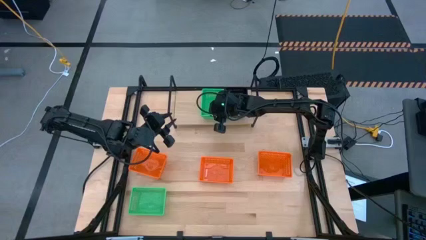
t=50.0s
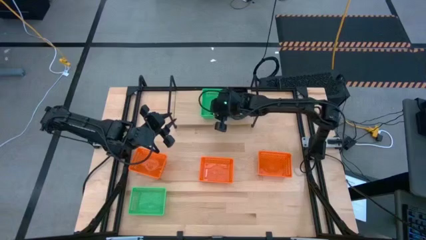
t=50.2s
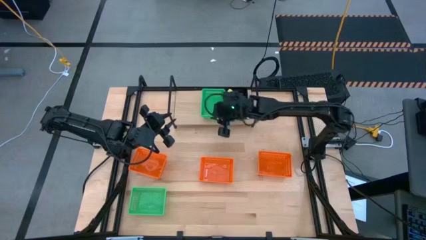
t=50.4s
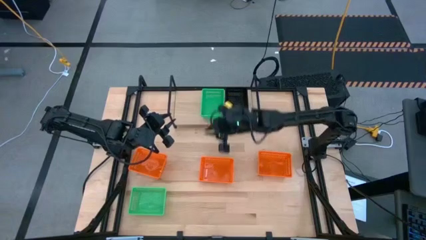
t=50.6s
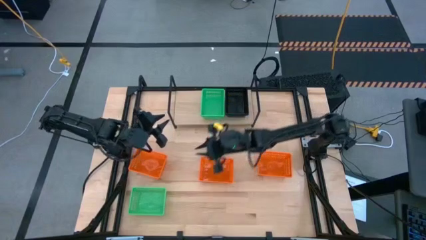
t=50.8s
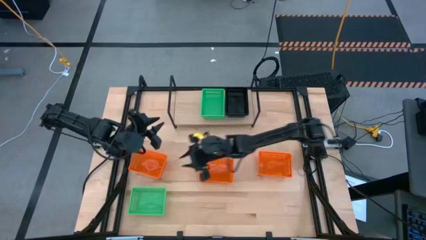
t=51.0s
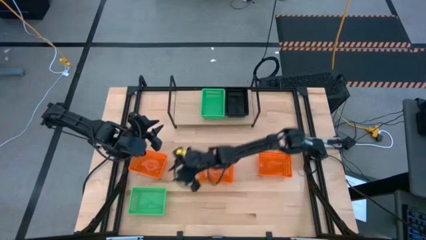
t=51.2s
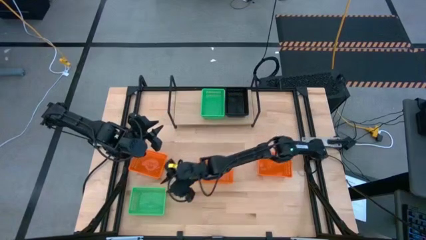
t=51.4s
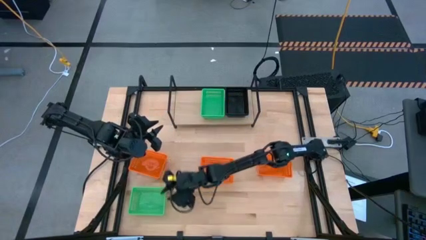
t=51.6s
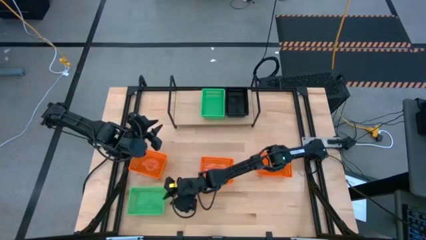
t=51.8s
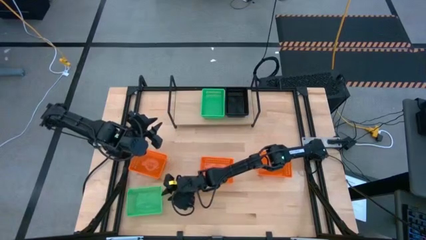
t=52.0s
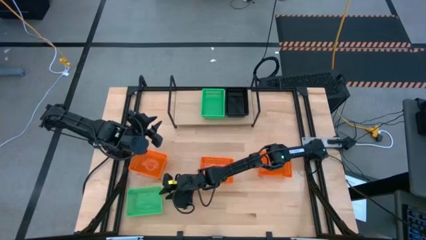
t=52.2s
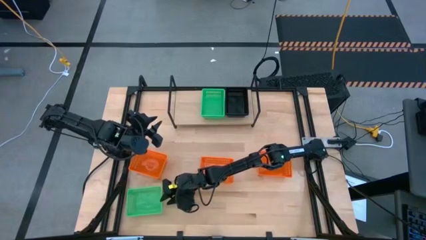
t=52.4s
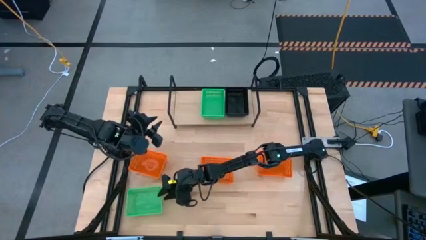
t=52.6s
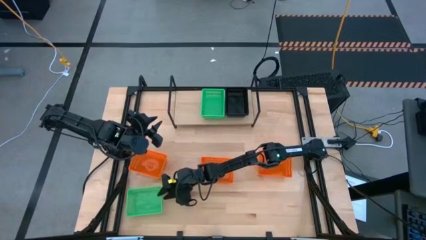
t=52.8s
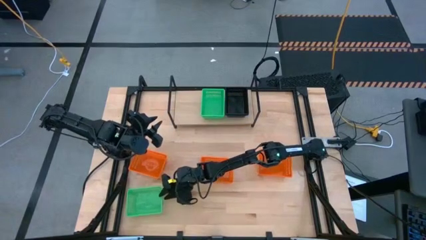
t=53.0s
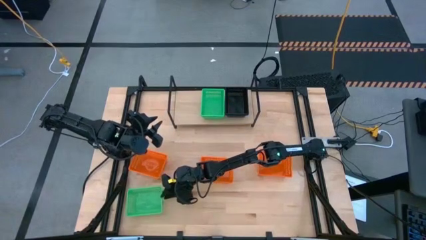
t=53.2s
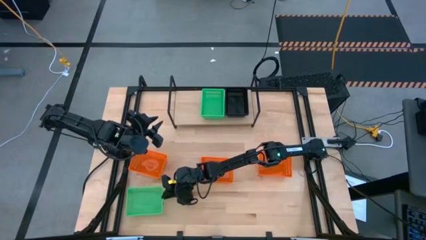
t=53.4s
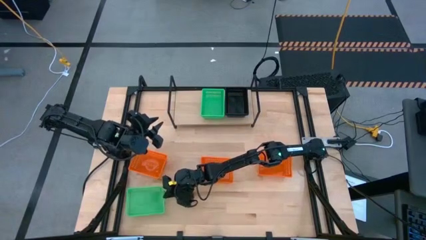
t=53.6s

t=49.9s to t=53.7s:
Task: Stack baskets on shelf by color
Stack the green bin on the green bins on the shelf

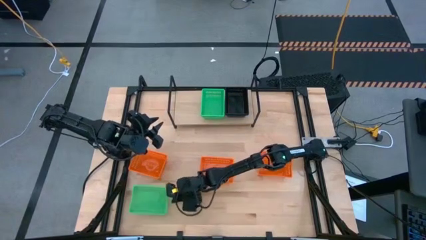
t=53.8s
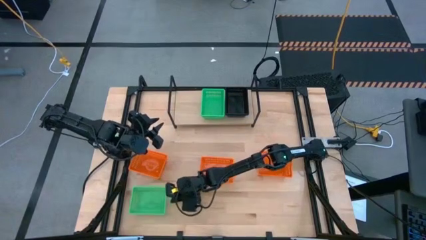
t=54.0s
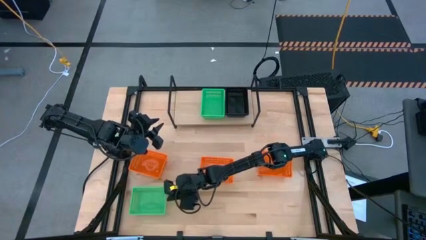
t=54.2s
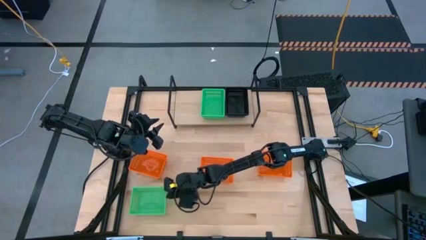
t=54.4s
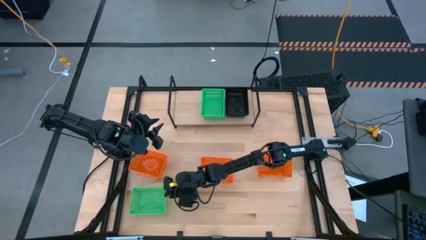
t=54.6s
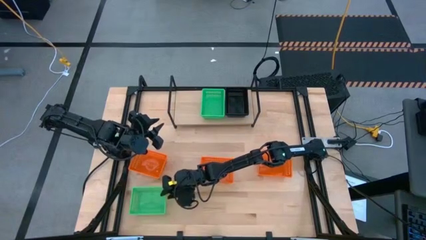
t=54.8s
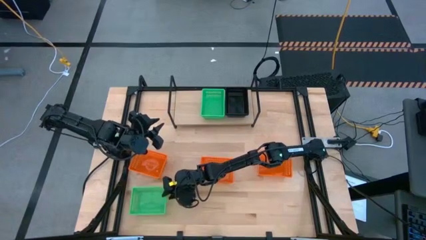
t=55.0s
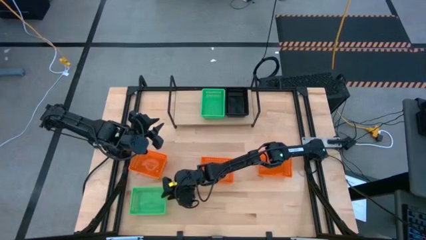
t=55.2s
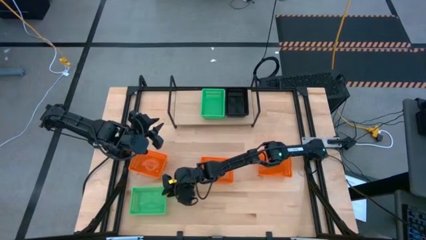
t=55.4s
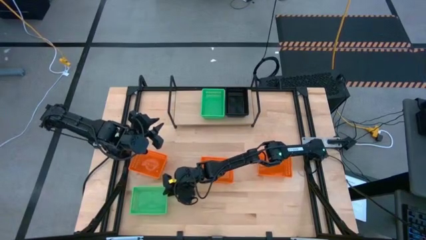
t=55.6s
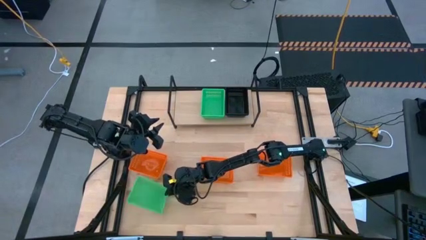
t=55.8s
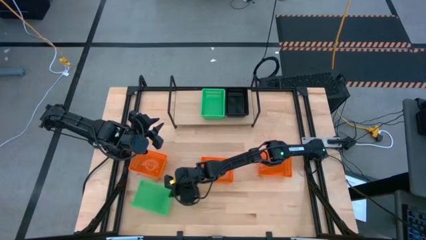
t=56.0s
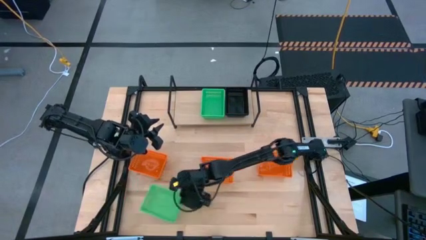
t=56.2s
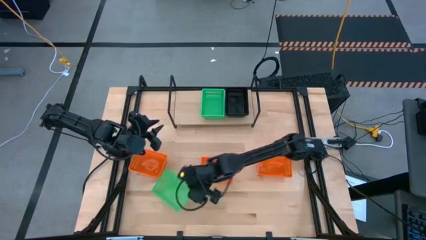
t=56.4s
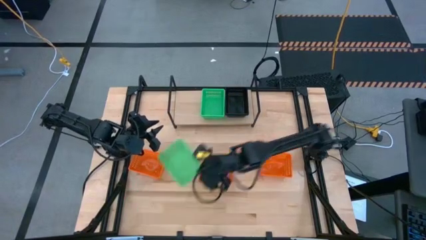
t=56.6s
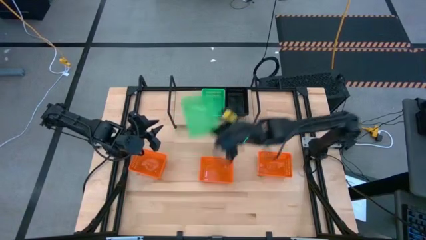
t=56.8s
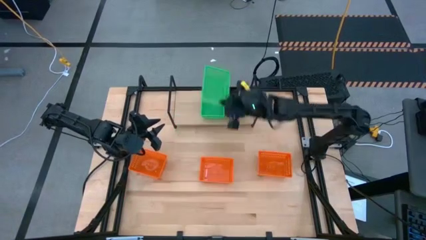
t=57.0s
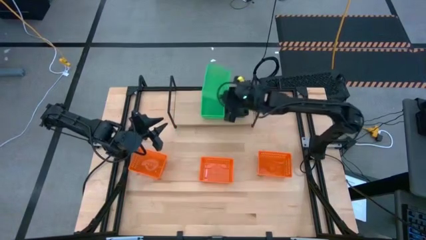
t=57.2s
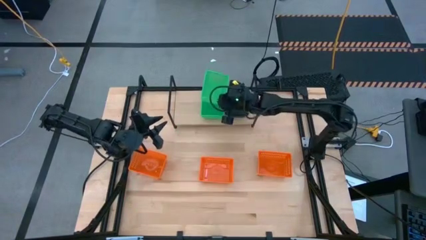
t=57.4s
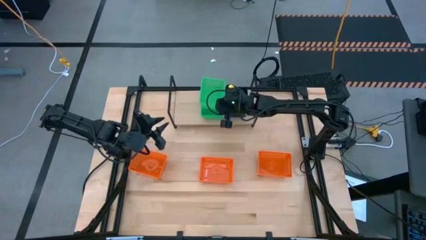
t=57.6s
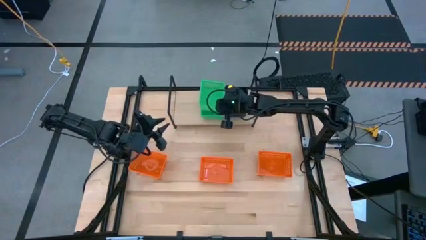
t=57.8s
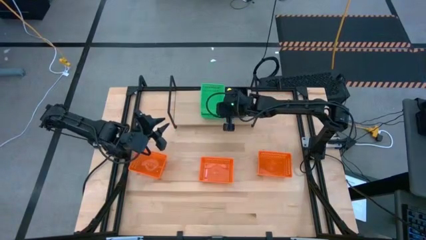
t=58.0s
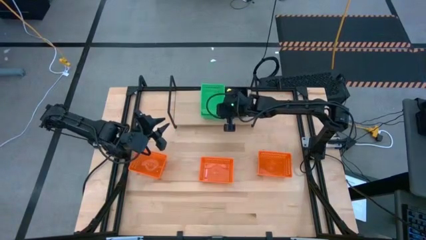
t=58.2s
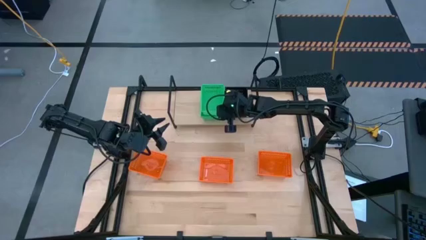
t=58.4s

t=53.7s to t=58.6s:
Stack the green bin on the green bins on the shelf

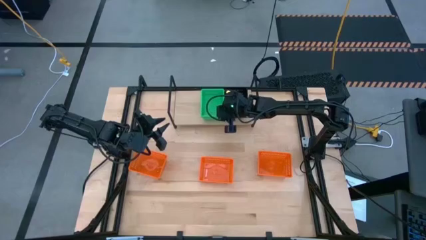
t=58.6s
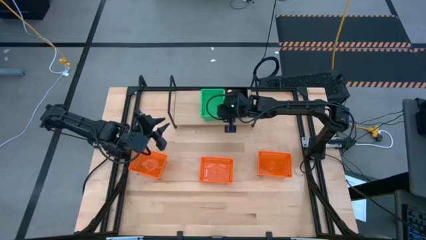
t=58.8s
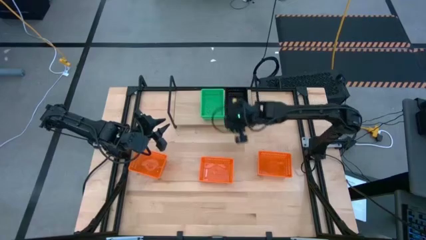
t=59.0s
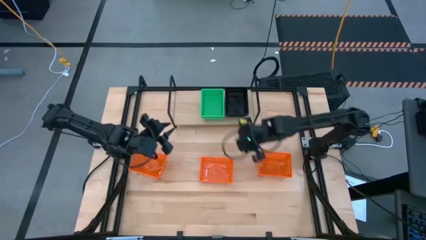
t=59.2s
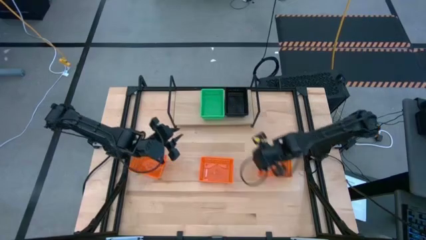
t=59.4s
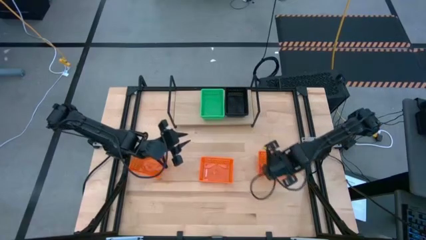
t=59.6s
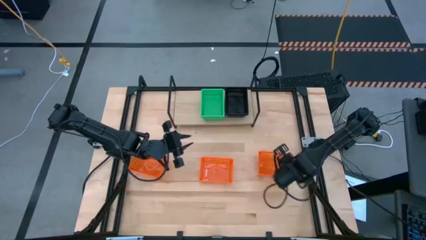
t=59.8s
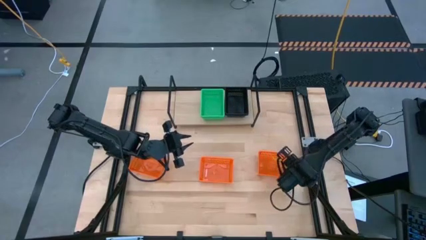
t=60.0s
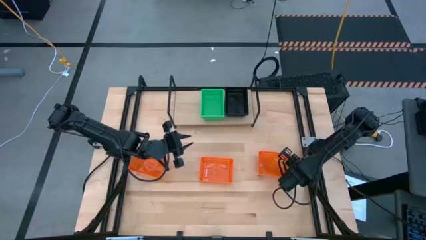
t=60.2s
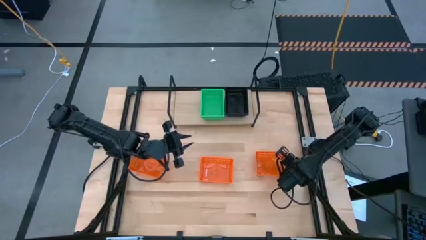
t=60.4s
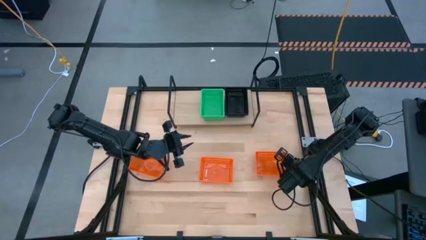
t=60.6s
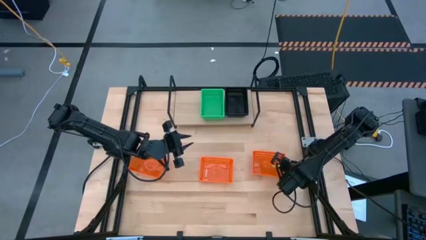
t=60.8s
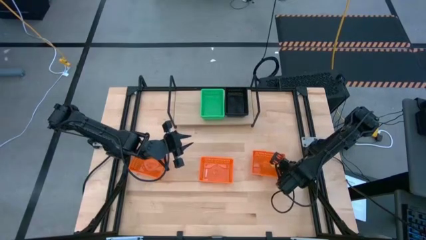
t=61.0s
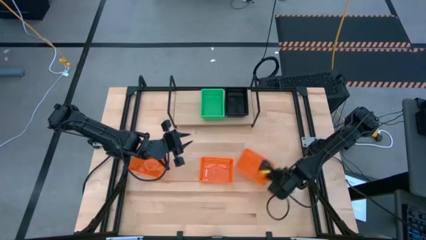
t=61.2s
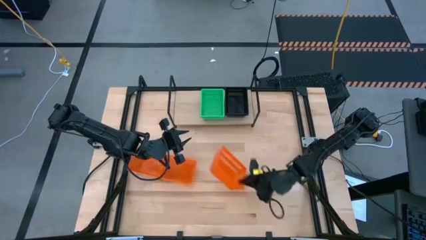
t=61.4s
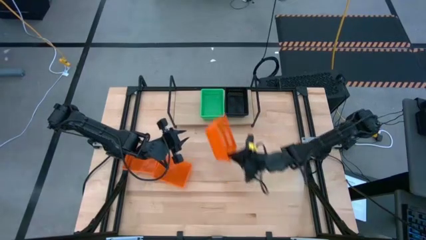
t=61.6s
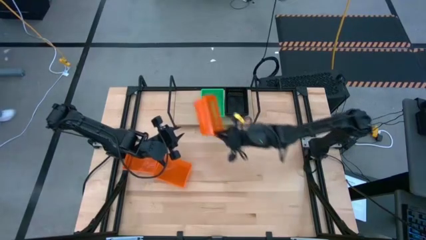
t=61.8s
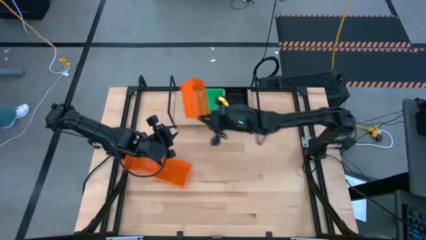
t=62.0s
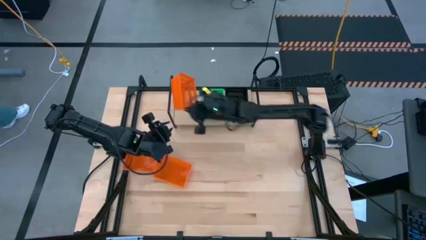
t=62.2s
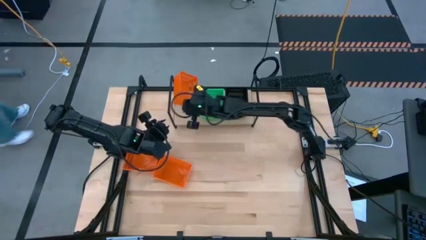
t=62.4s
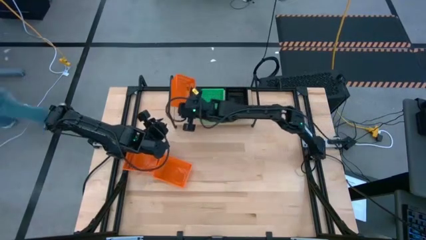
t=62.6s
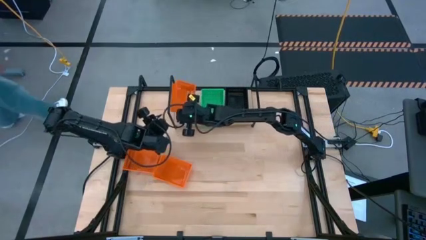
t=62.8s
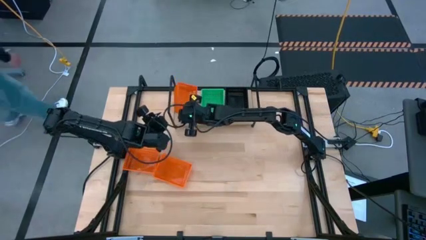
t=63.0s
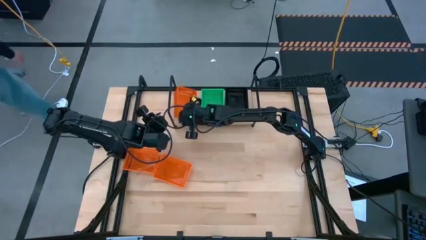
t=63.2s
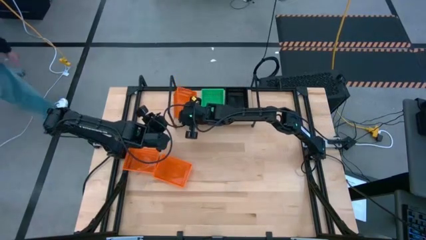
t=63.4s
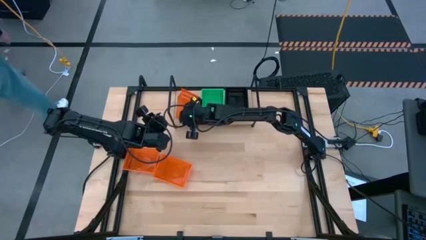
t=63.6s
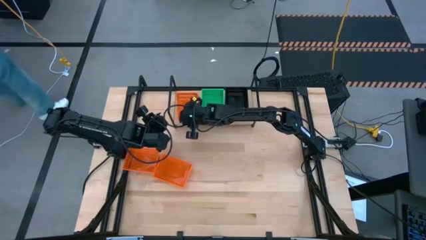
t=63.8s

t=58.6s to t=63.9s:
Put the right orange bin on the shelf

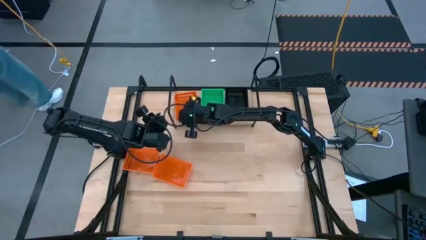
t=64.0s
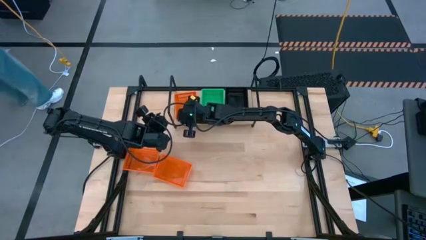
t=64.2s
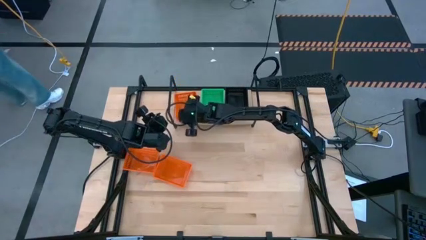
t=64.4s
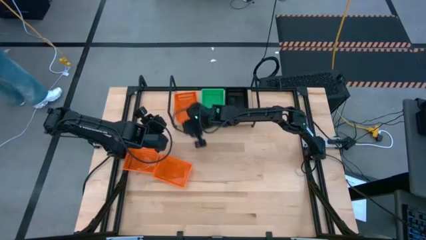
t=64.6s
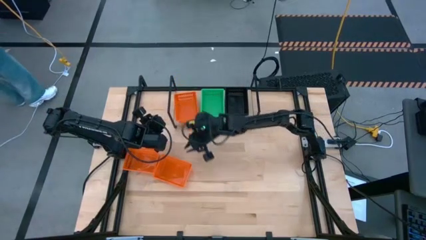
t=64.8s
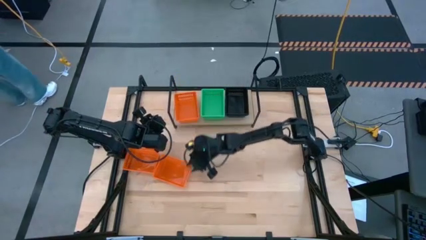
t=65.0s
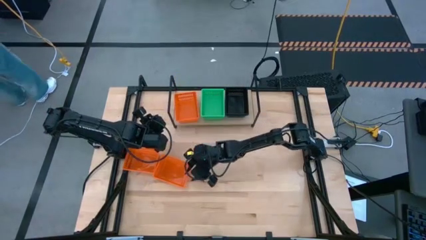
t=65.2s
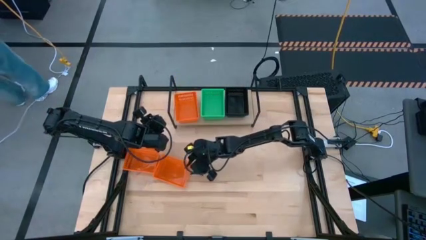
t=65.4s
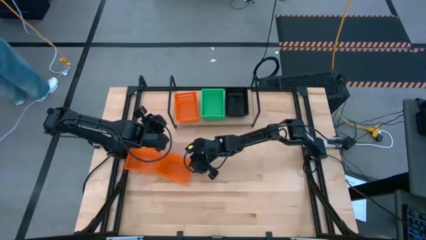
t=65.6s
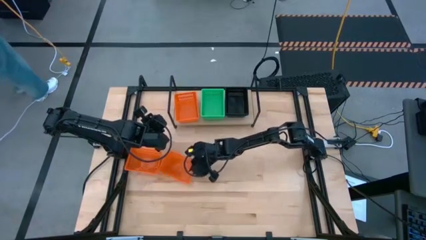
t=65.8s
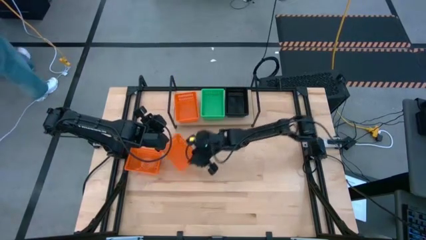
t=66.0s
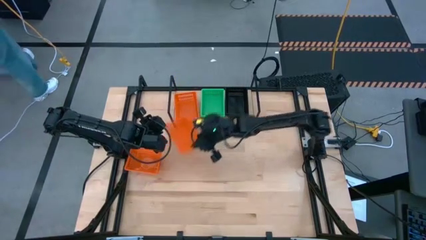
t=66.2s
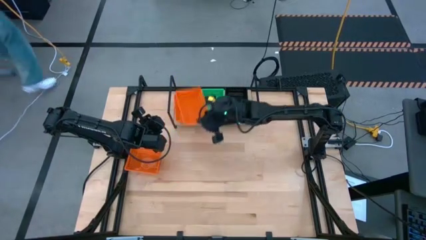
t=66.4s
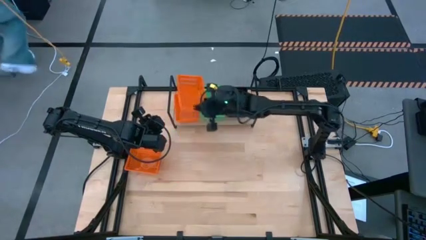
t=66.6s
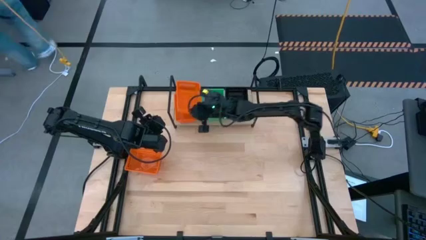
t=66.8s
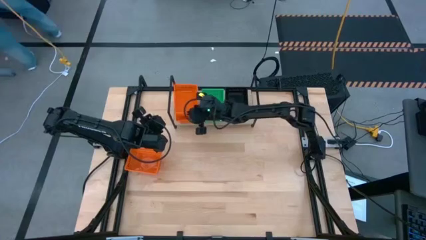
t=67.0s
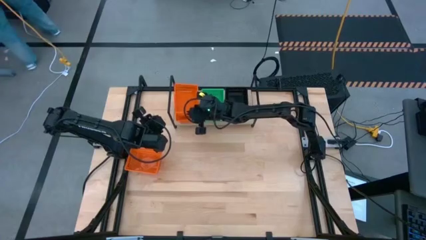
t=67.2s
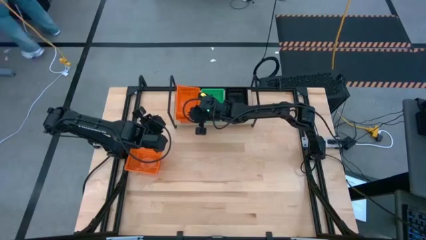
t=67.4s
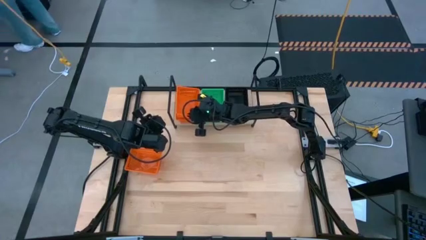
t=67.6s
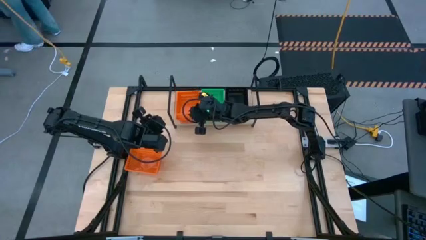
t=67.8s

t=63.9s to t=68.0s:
Stack the right orange bin on the orange bin on the shelf
